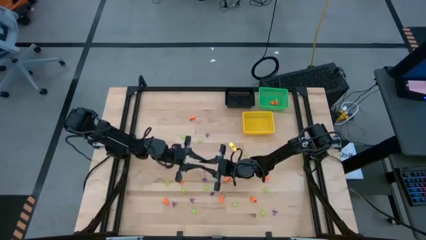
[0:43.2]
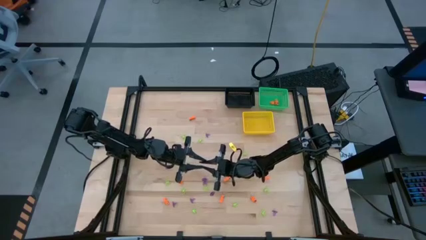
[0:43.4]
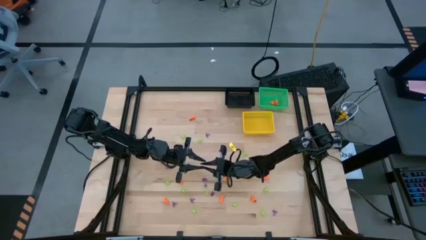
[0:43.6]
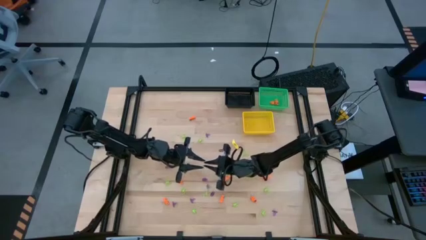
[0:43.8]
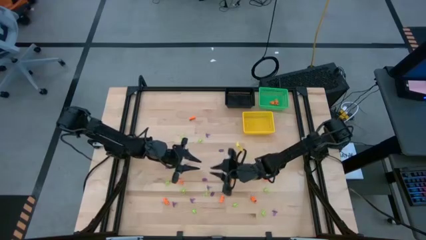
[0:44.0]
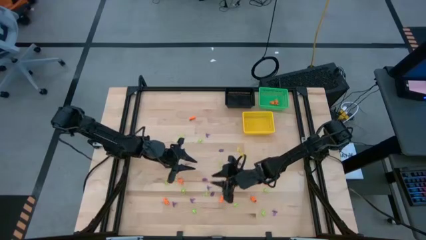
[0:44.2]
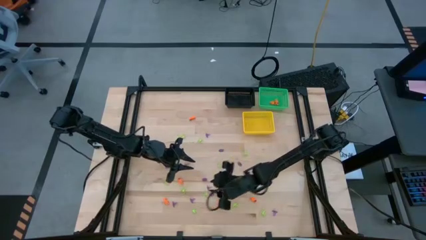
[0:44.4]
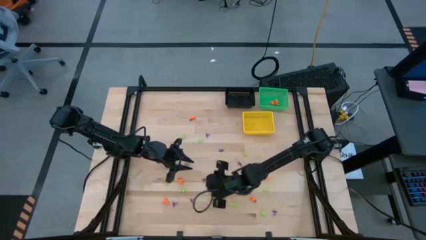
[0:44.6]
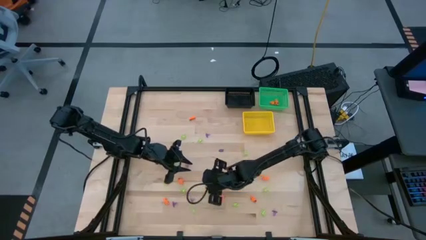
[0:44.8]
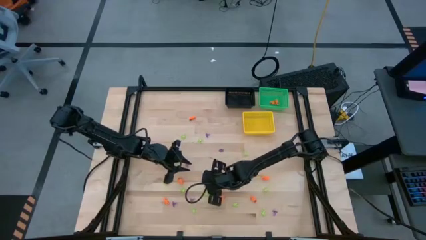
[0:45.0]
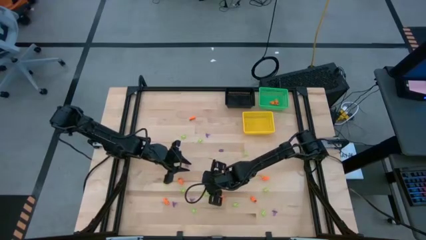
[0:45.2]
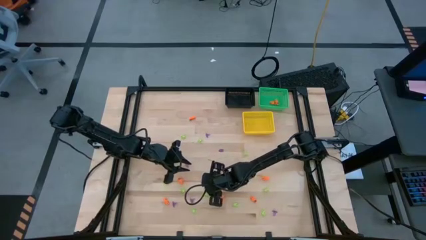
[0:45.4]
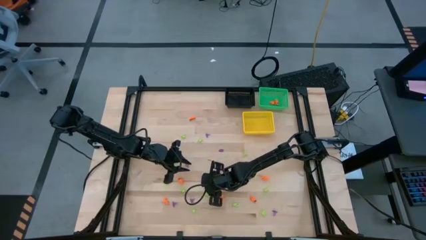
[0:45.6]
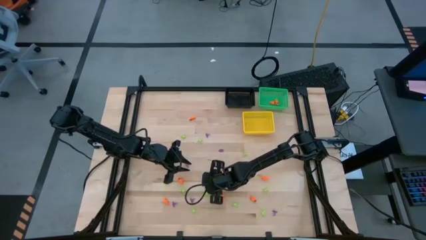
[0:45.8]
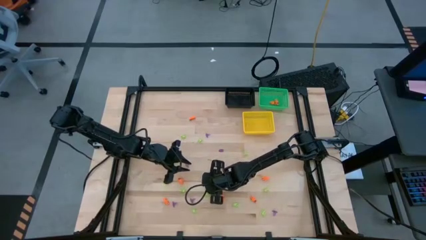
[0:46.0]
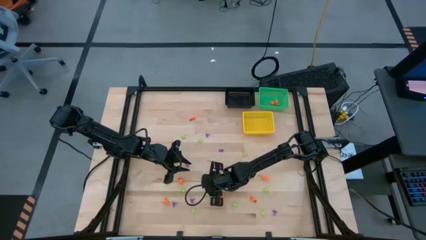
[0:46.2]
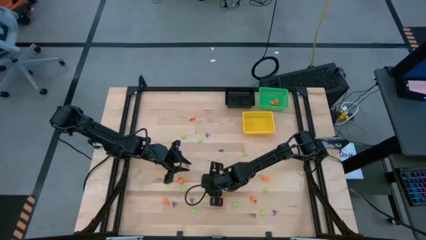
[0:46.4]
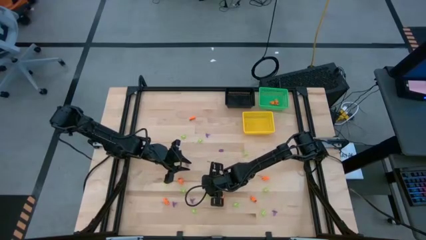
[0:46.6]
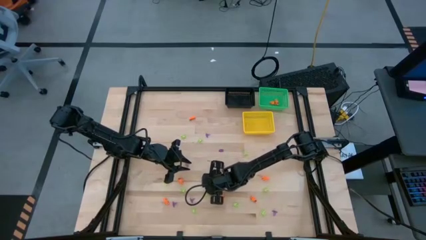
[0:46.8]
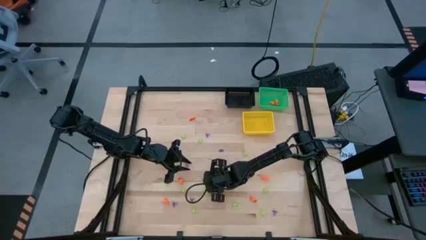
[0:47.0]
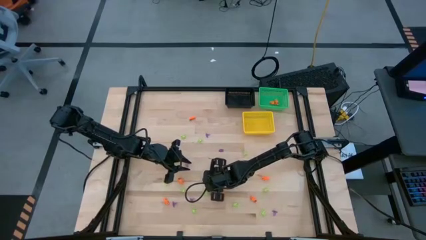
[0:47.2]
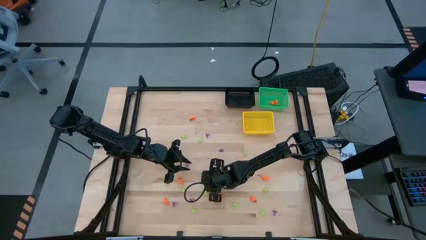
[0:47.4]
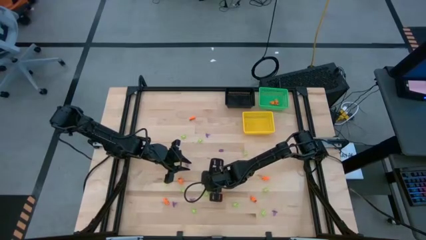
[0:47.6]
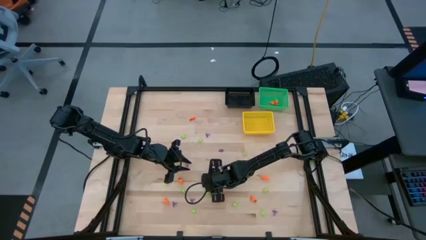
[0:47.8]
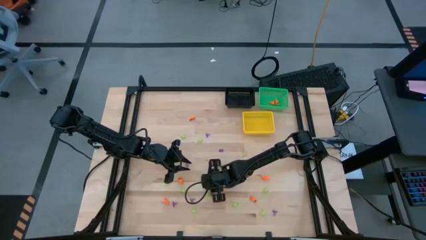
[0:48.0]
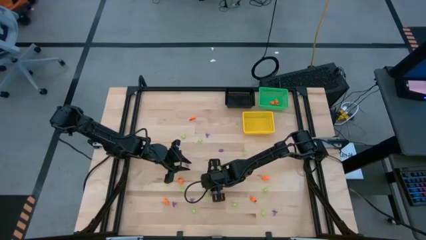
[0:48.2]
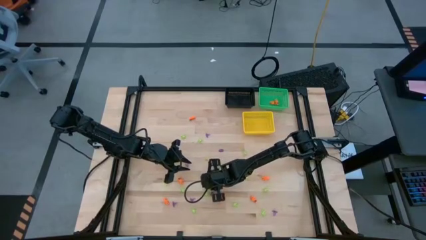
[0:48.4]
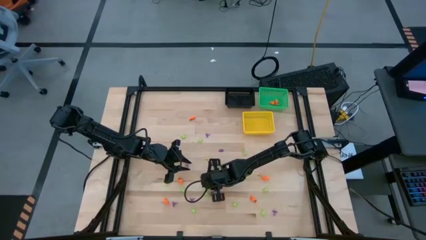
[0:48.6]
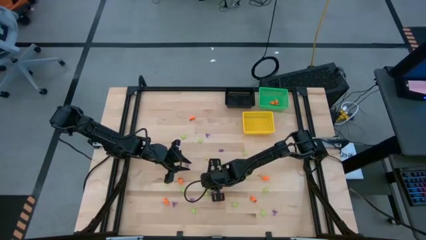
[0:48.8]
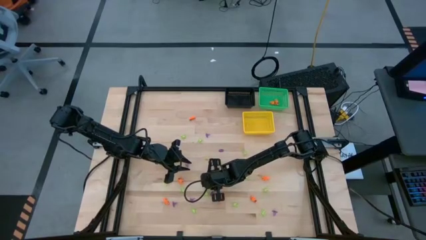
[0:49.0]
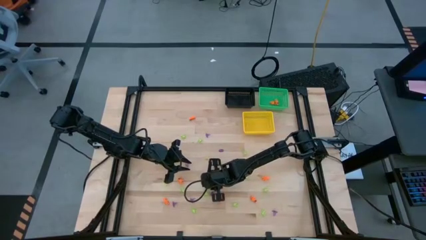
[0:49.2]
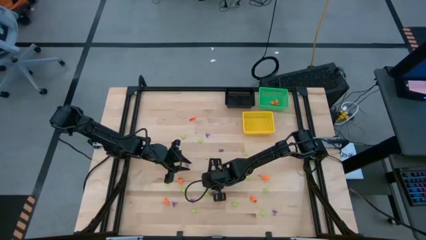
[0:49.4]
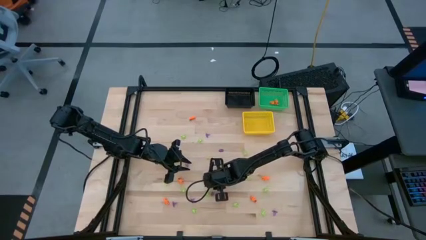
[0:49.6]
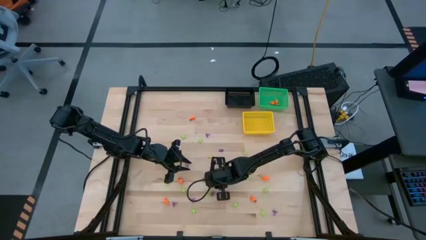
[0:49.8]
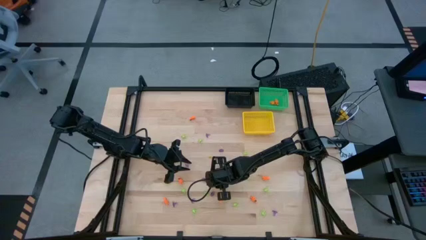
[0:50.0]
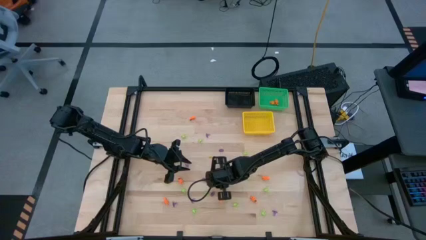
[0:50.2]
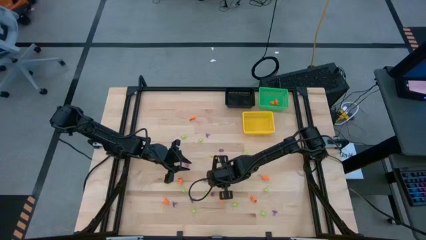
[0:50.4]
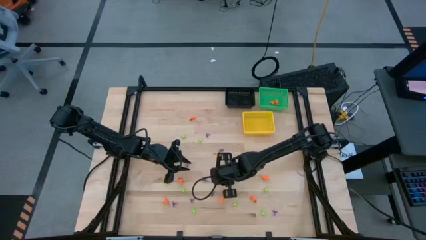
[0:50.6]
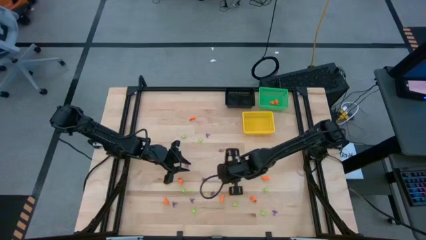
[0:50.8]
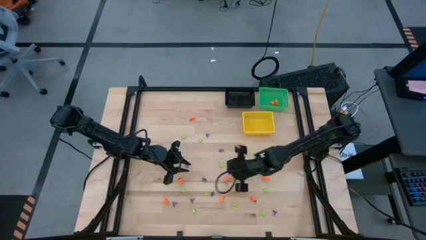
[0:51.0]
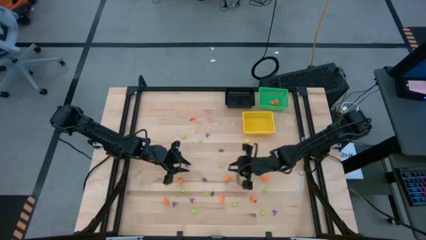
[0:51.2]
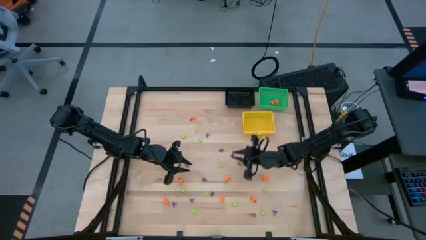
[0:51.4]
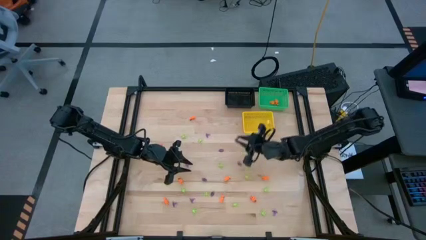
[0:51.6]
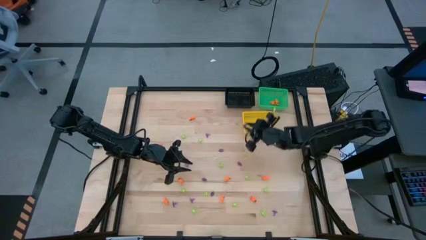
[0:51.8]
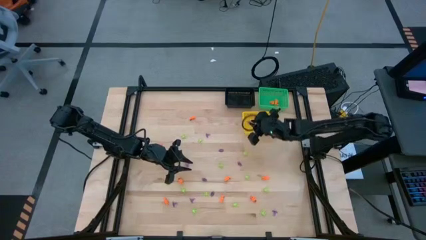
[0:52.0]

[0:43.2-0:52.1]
Task: Sort Halloween decoration
Put the violet witch hat toy into the yellow basket

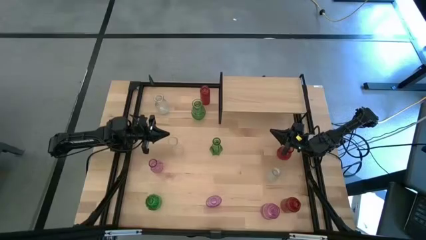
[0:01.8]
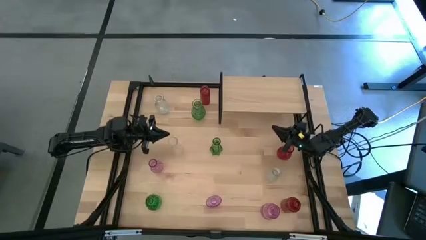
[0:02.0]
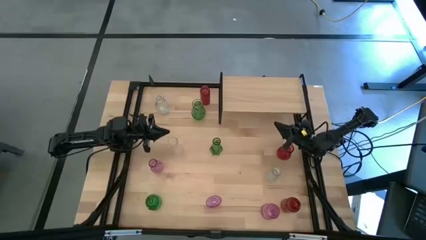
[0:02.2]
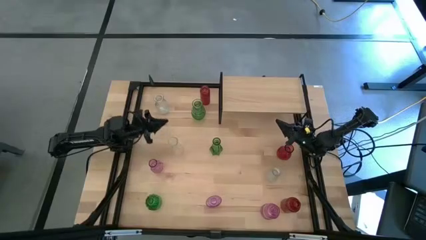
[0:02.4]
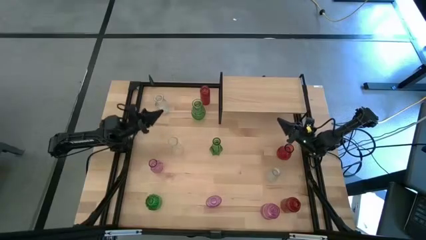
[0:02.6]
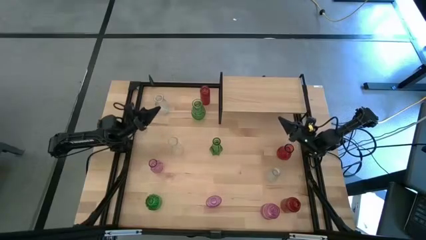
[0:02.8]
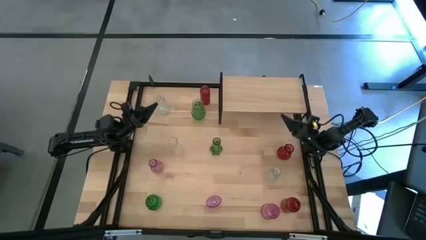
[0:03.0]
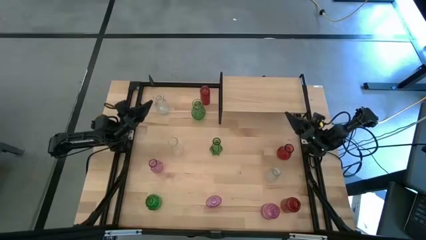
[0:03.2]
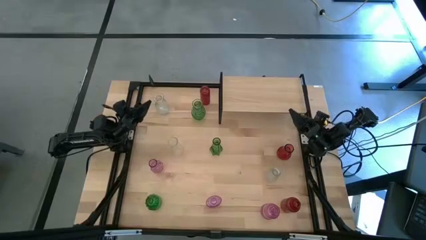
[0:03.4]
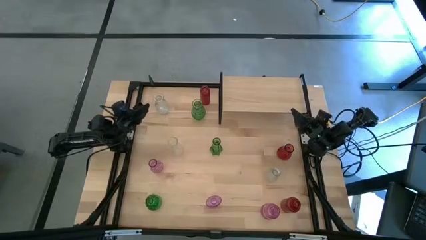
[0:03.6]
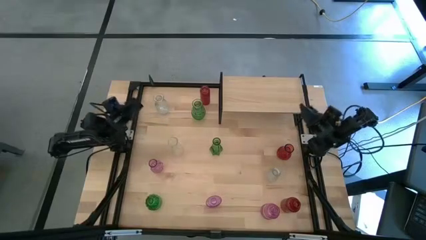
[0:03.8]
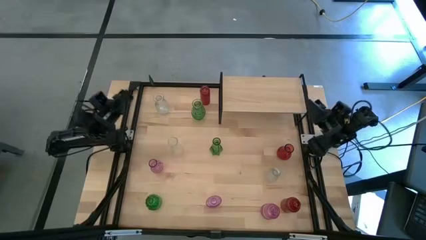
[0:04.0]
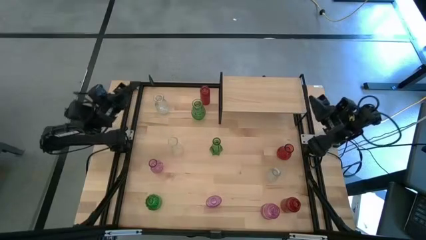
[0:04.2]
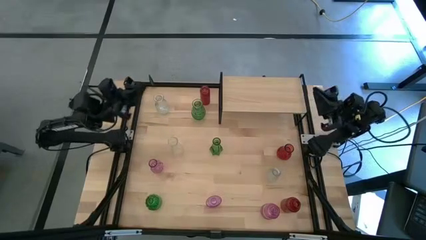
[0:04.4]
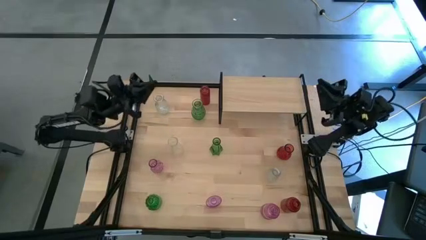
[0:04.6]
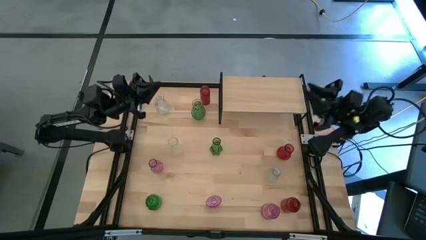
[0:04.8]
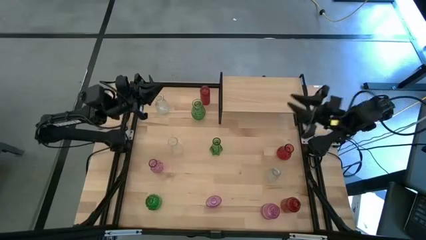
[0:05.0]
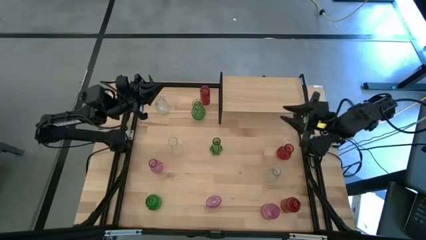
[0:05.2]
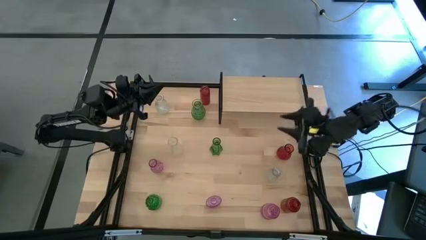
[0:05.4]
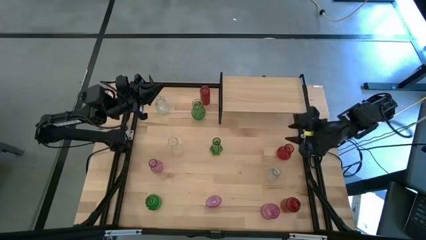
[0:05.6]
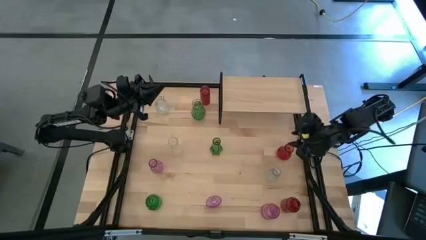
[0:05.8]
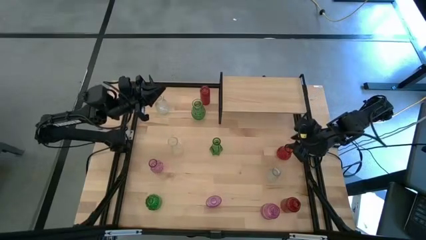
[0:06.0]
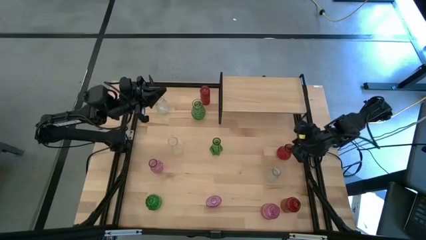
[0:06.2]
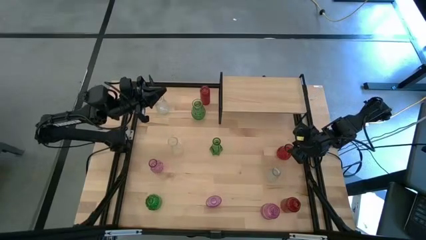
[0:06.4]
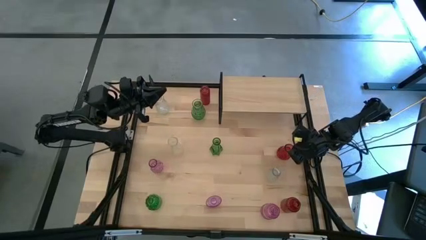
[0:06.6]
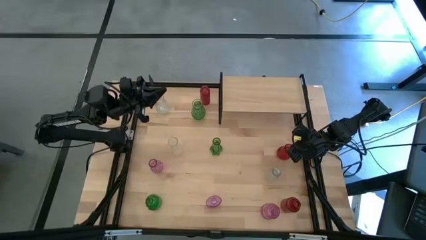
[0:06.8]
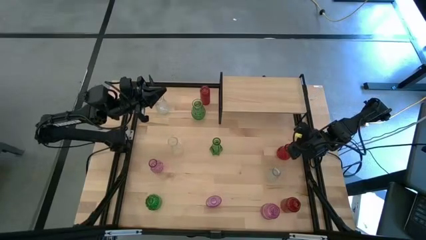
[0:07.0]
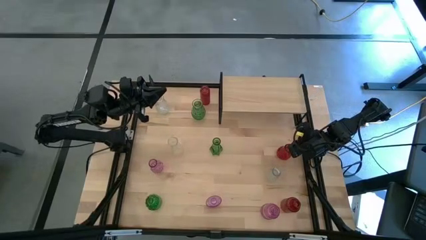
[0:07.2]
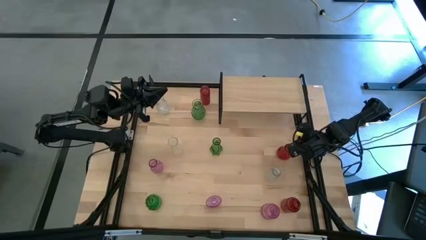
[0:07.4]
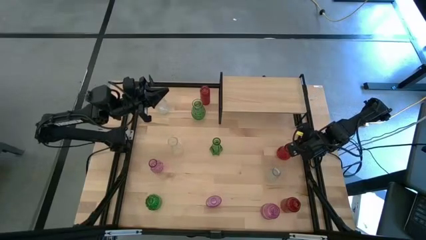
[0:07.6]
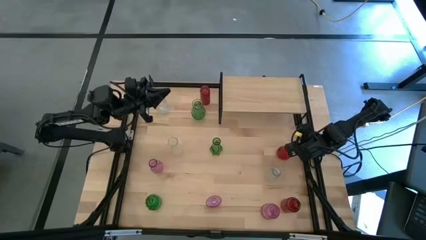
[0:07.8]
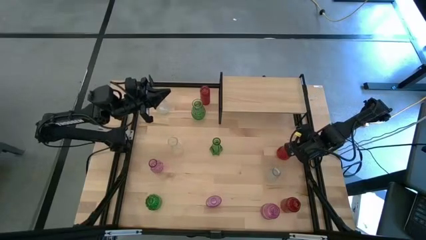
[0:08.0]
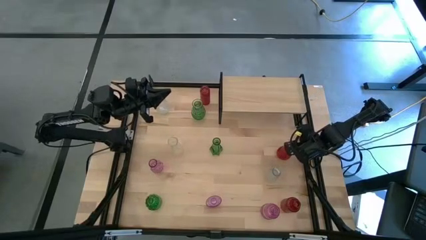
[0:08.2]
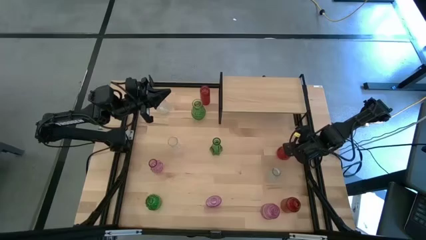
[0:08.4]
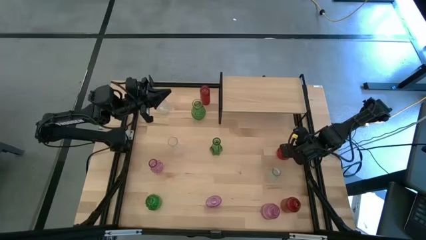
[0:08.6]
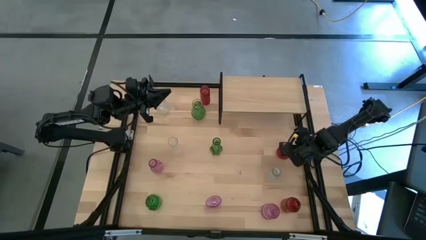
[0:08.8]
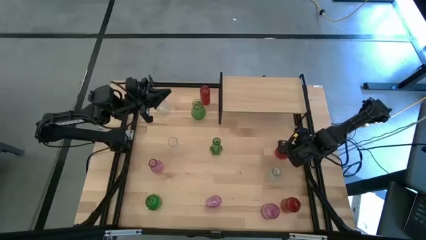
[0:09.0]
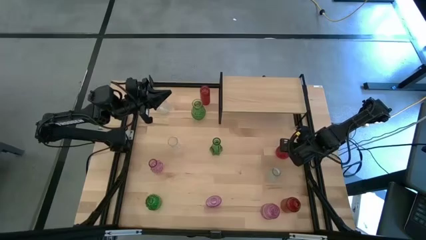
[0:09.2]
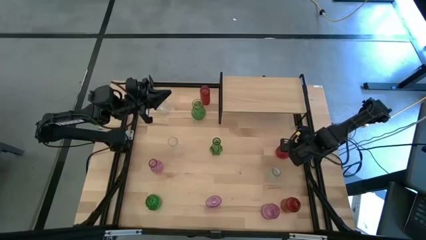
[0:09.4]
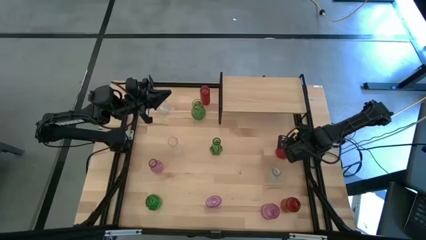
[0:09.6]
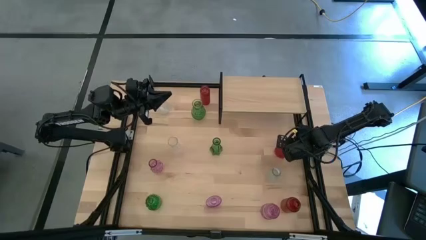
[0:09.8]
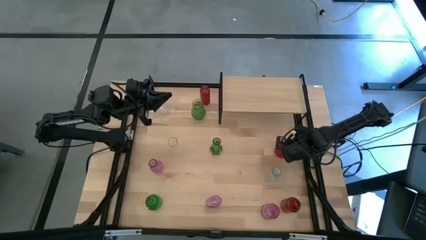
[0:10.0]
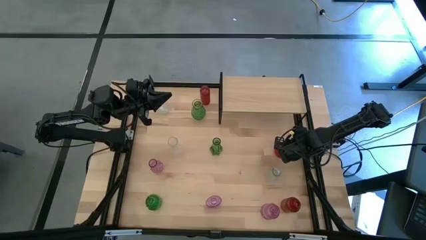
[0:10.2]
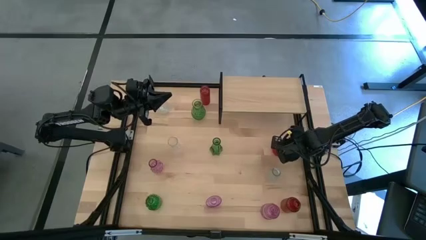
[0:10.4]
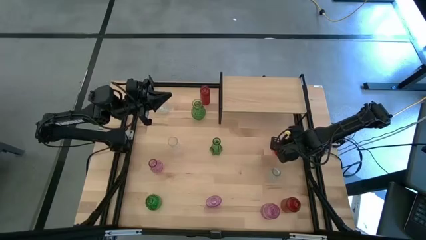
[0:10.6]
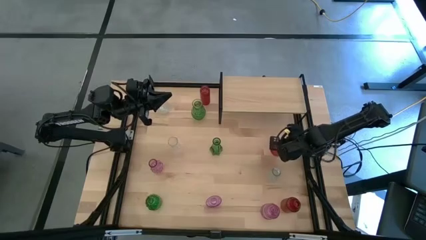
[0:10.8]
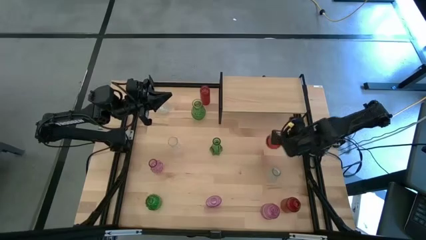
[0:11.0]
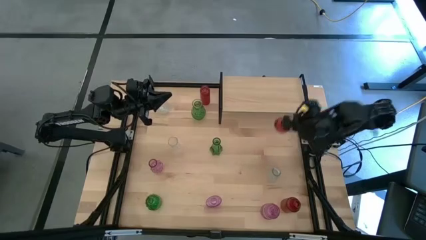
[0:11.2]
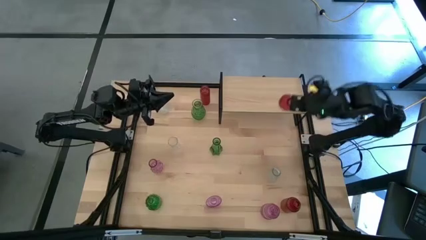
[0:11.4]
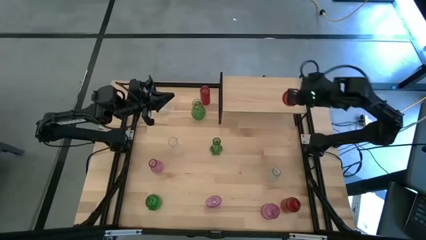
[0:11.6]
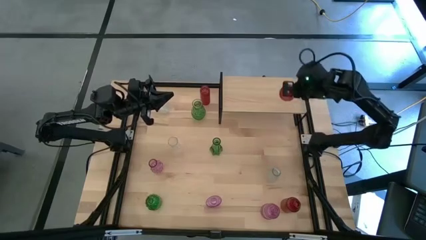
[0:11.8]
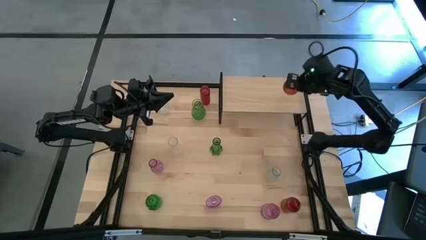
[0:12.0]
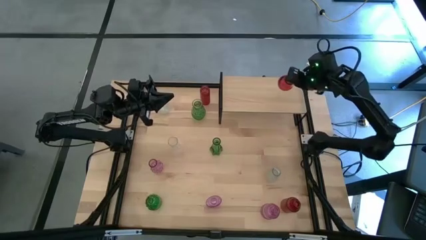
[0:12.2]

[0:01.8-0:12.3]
Task: sort vases onto shelf
Put the middle right red vase on the shelf
